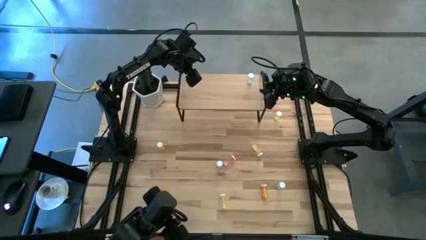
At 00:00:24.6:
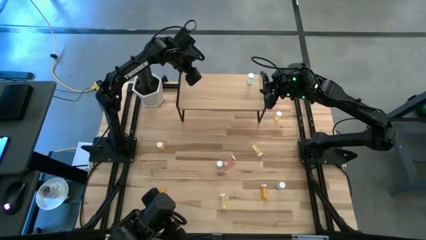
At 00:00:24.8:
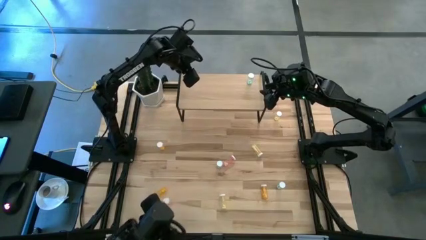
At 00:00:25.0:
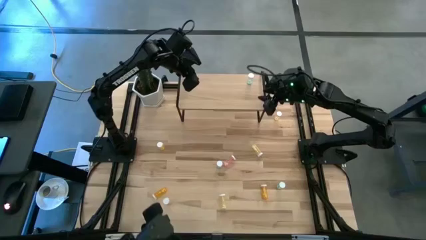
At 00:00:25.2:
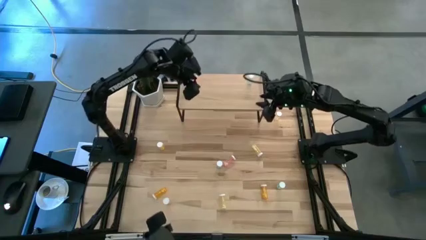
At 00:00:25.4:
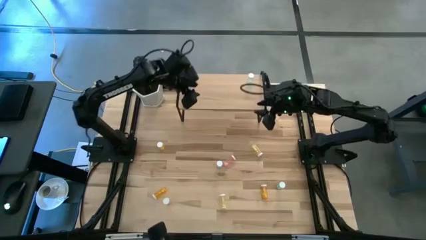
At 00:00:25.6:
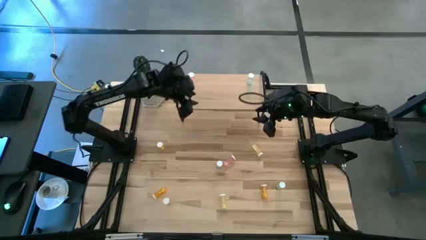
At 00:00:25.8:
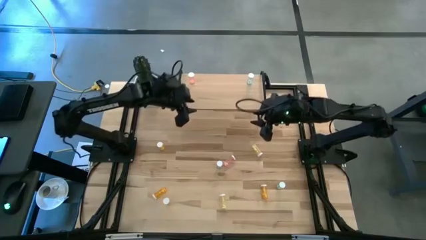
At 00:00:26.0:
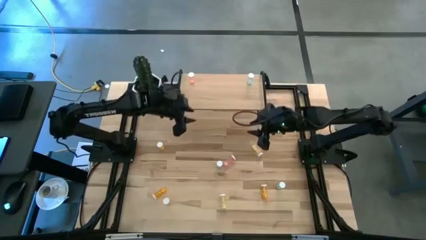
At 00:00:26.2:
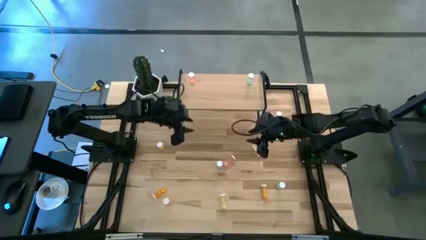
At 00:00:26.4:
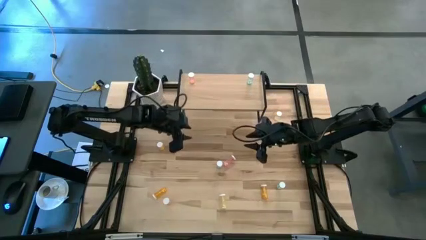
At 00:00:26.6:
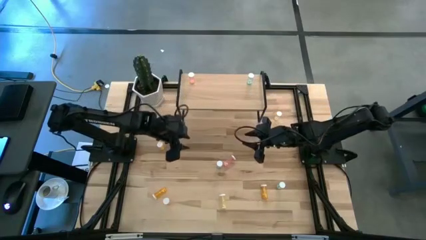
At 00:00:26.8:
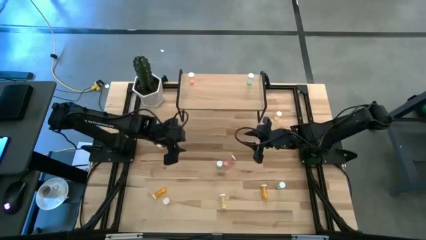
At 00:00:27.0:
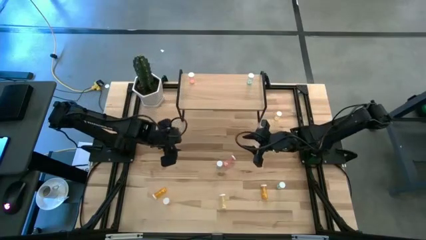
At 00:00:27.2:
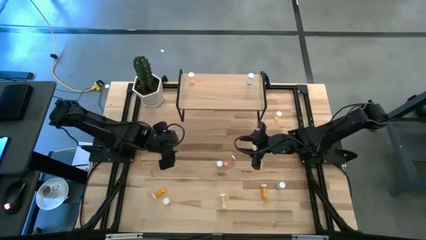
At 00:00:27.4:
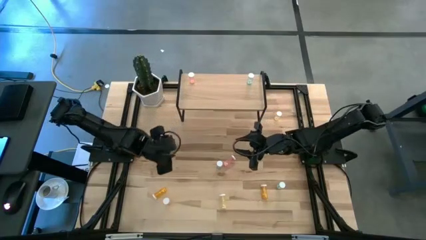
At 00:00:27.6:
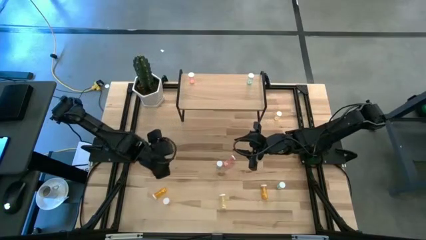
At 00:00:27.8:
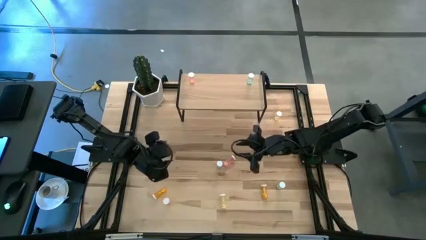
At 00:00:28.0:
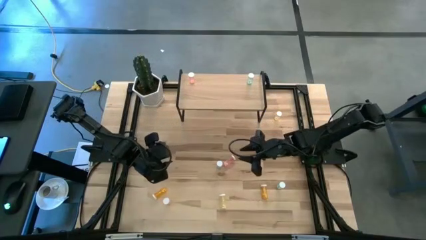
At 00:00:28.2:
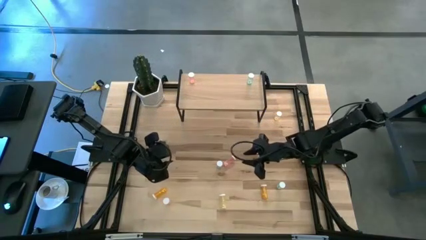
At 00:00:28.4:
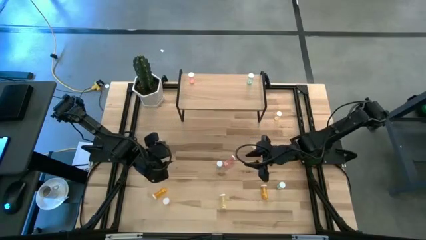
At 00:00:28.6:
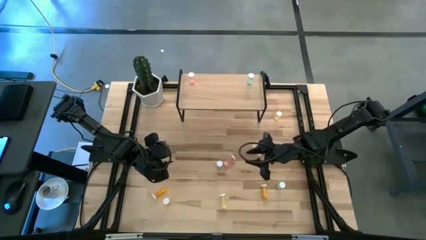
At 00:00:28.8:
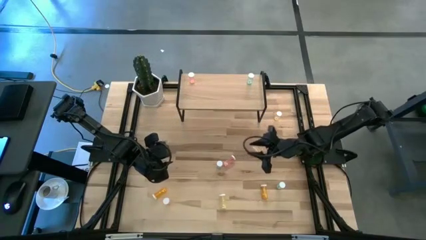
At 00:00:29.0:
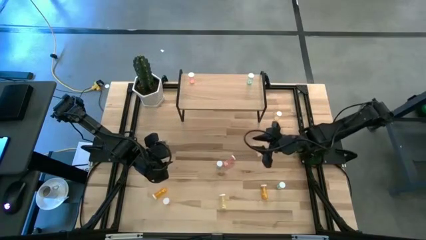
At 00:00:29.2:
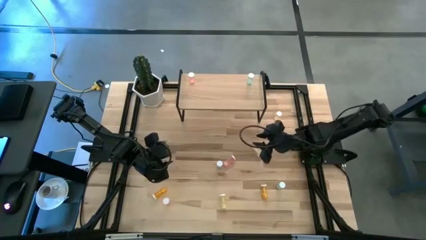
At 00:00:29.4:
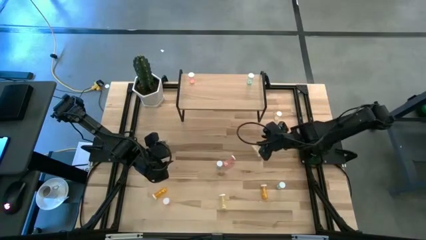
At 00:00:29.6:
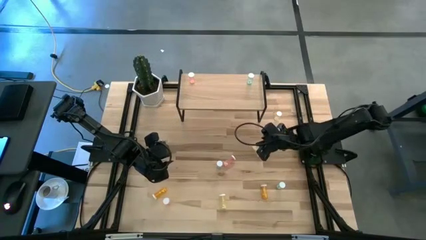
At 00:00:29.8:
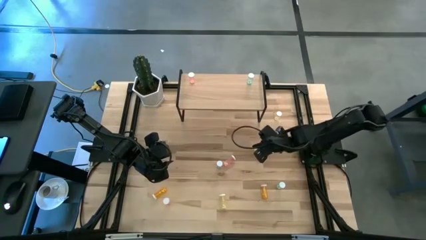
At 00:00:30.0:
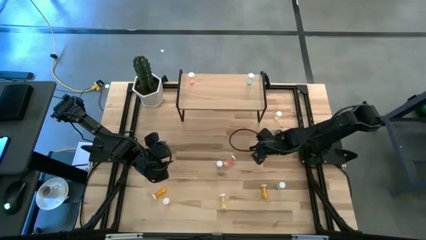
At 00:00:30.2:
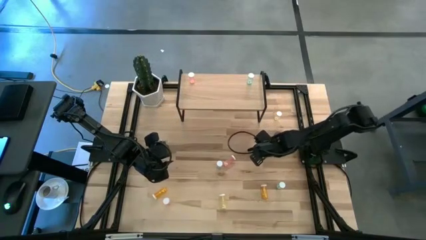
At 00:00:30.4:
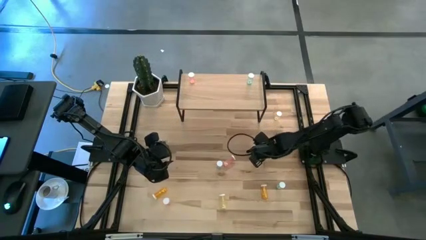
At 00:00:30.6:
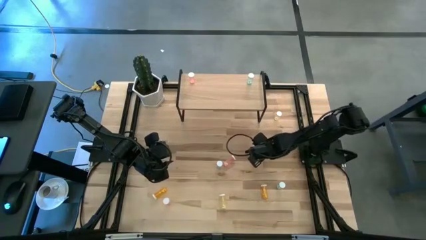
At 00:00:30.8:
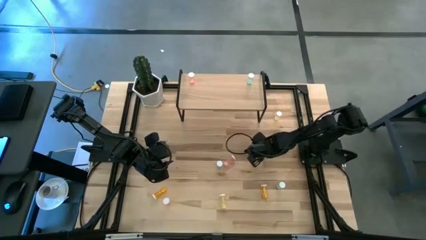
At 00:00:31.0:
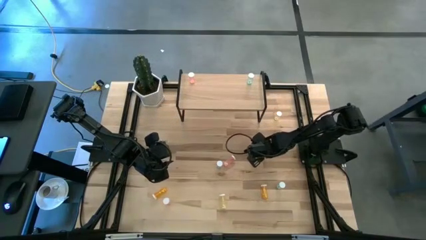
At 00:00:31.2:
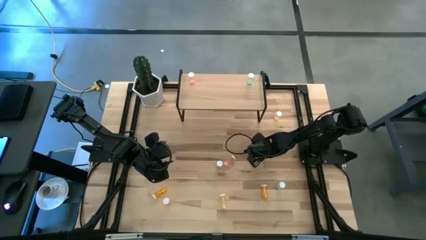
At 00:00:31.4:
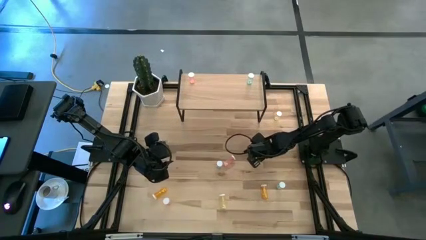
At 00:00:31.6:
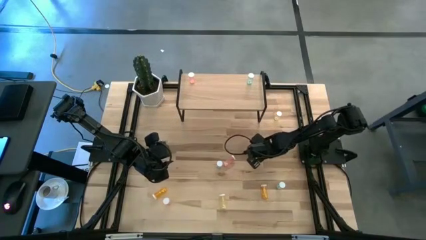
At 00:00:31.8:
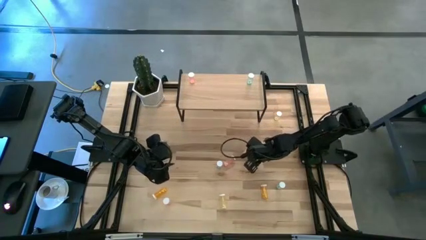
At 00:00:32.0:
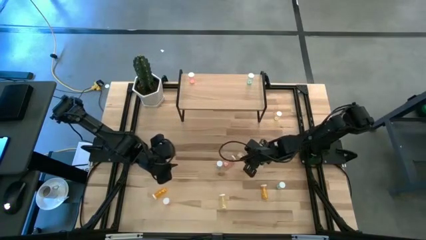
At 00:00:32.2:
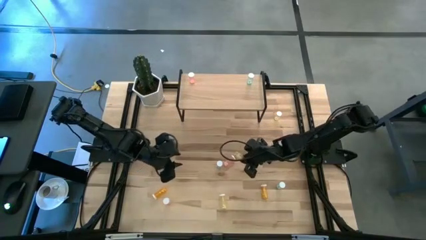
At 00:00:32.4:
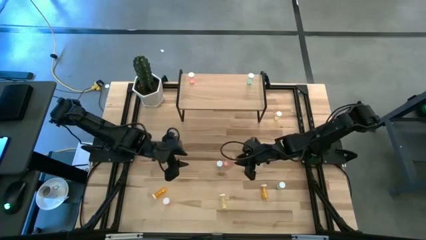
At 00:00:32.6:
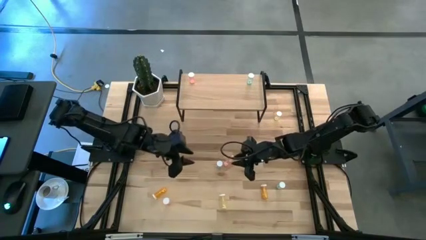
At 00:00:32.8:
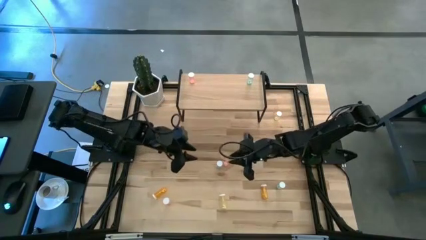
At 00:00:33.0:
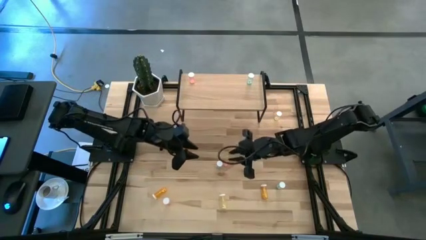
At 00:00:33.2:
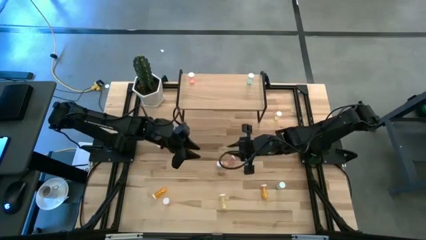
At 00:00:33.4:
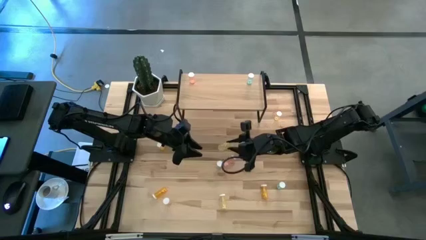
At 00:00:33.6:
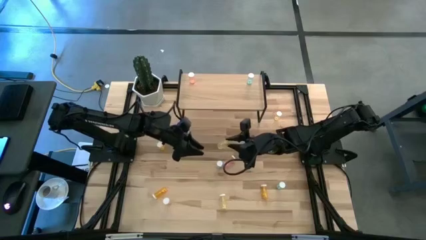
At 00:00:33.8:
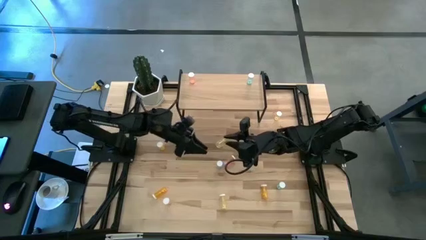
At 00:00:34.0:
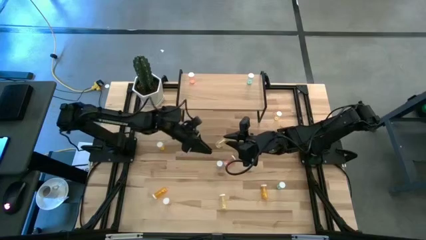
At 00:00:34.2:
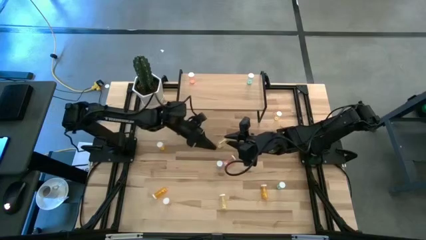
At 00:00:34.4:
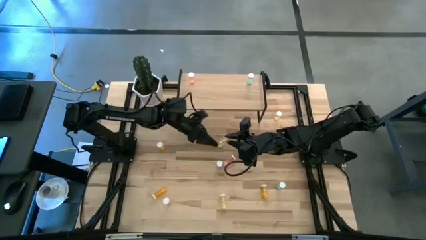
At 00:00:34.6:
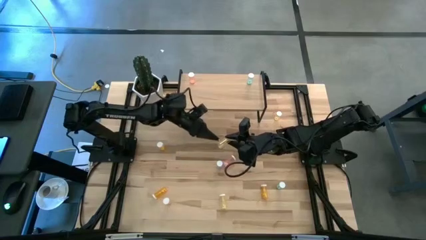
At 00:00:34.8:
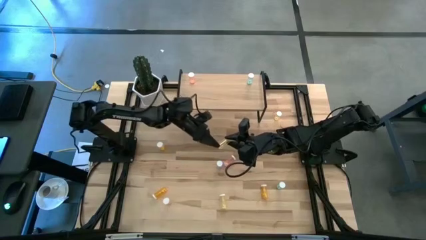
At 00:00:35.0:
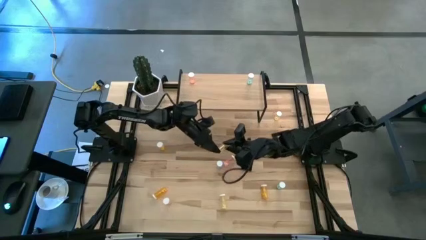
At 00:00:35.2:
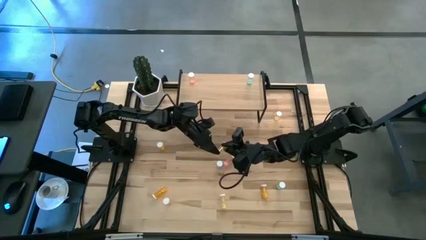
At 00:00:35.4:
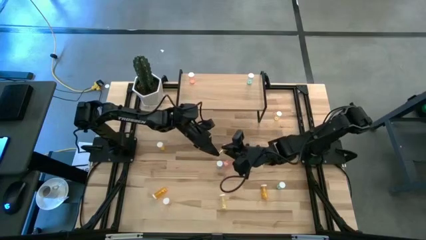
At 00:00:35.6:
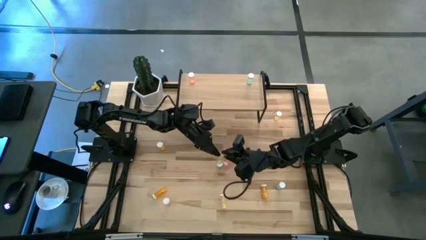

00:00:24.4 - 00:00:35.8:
Task: Pick and place medicine bottles onto shelf by color
Put the middle yellow pill bottle on the shelf

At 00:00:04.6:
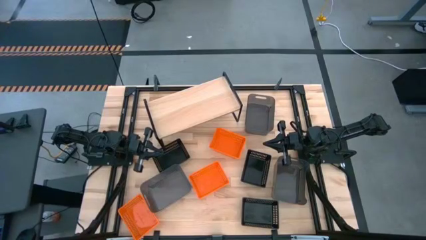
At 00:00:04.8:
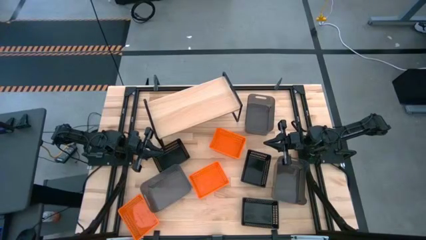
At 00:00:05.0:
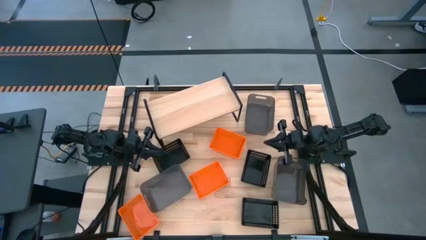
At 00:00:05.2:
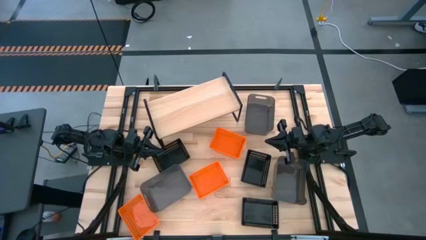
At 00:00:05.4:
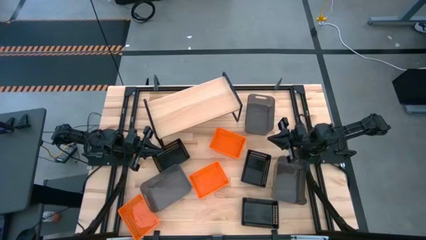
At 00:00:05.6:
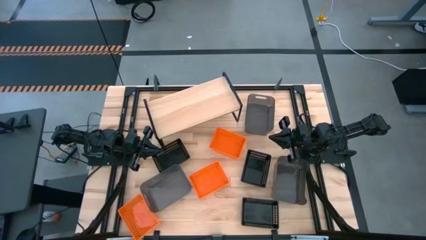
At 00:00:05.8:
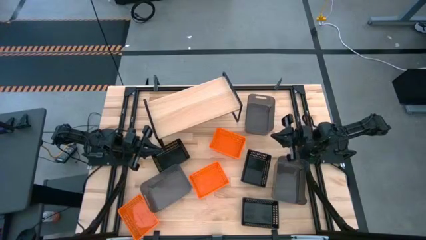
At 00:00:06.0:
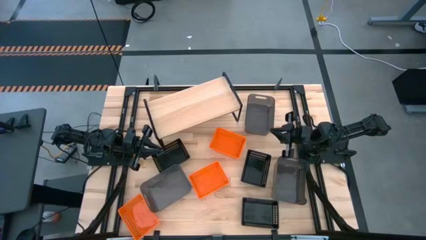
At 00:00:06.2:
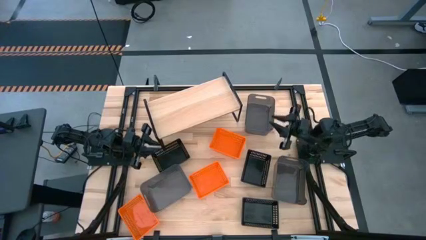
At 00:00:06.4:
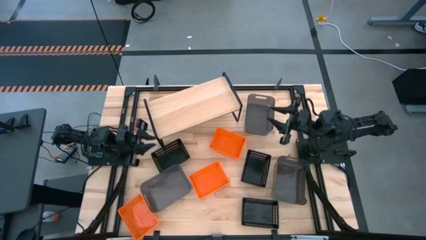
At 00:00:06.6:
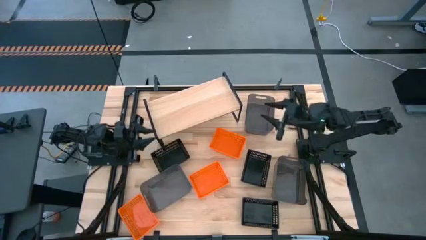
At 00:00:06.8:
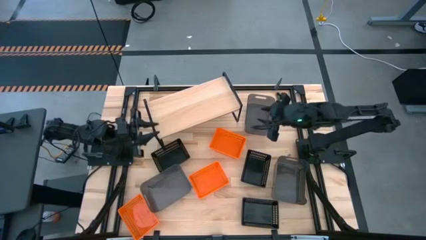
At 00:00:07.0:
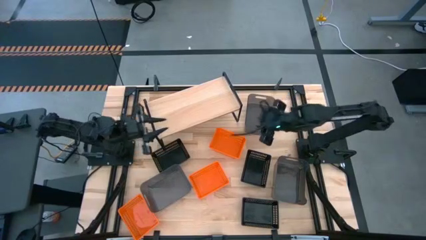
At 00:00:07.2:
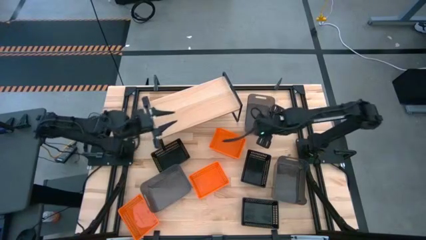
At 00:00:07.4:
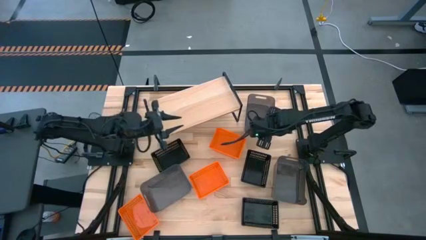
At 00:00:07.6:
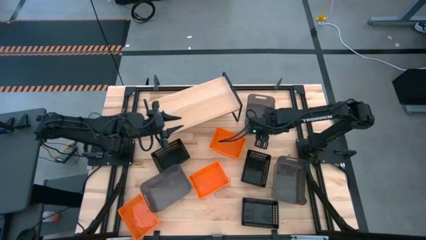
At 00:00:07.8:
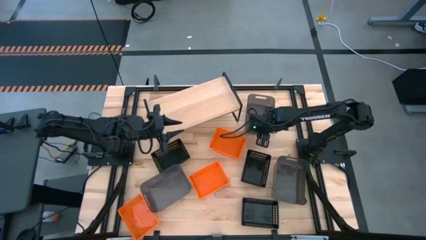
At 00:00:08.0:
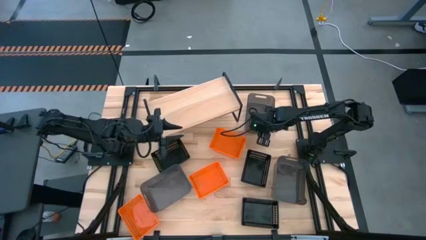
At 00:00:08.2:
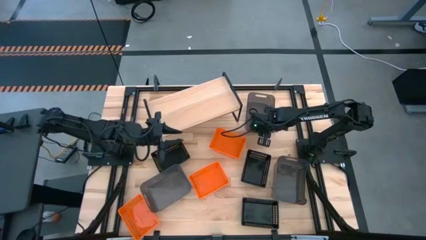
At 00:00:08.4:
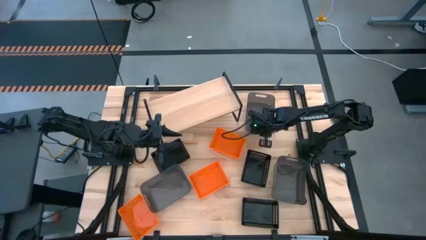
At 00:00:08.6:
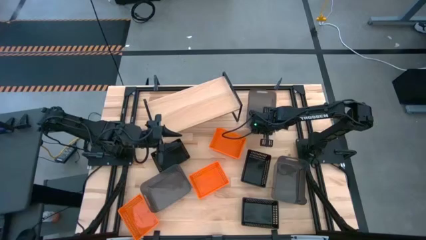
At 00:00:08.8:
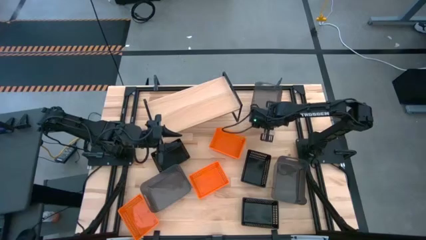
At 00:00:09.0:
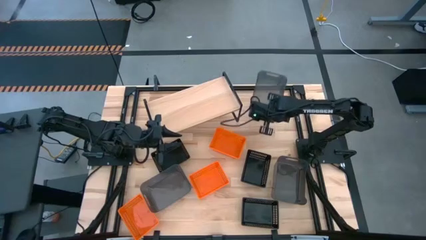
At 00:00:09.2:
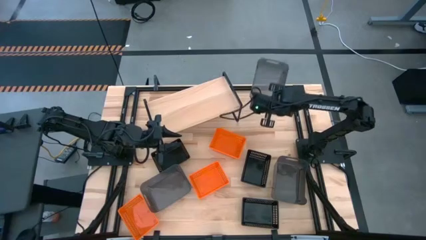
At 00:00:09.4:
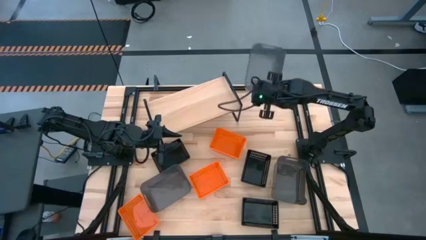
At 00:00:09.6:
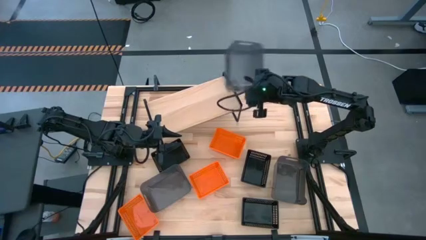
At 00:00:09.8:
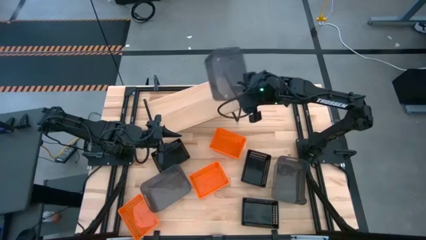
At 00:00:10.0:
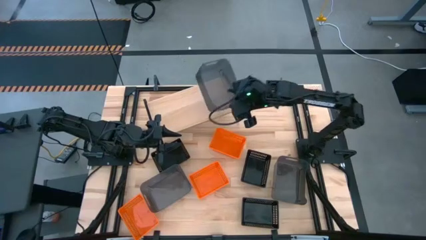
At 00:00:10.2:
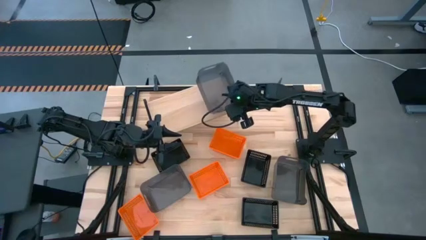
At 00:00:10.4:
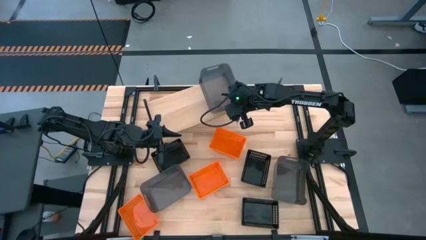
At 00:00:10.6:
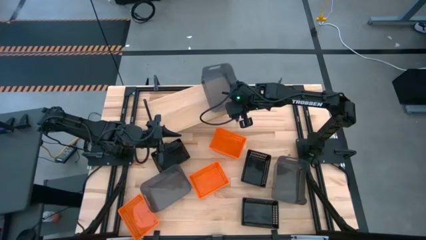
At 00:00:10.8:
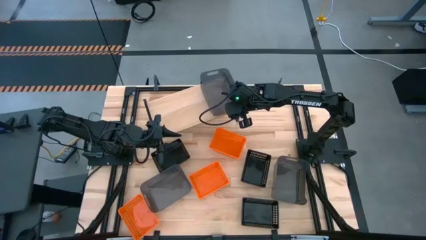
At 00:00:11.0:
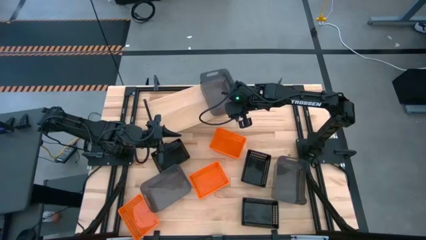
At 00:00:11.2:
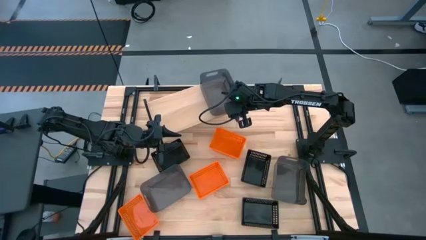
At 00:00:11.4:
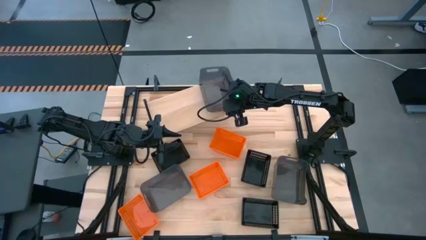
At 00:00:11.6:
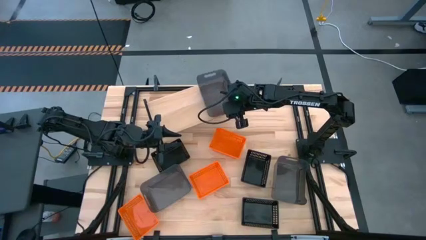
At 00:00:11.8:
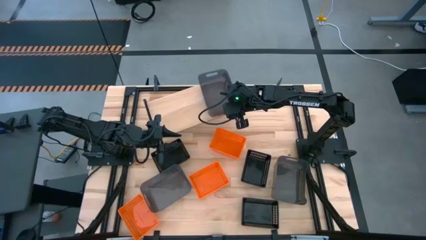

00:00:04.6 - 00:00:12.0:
Task: Stack baskets on shelf by color
Put the top black bin on the shelf
